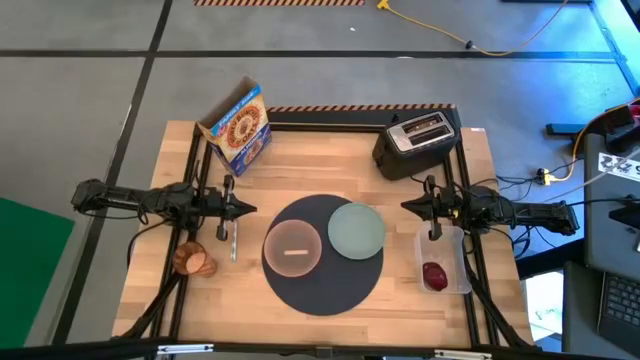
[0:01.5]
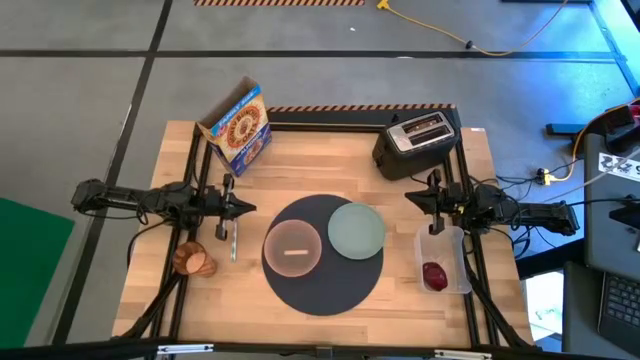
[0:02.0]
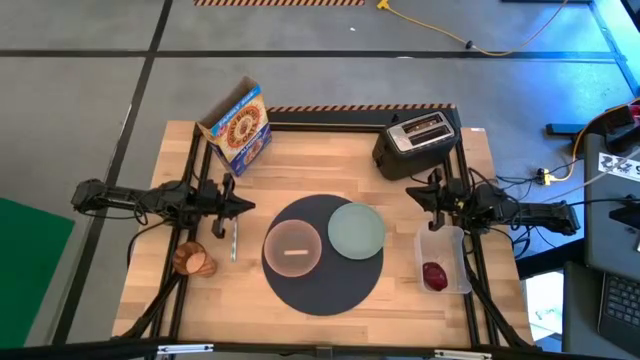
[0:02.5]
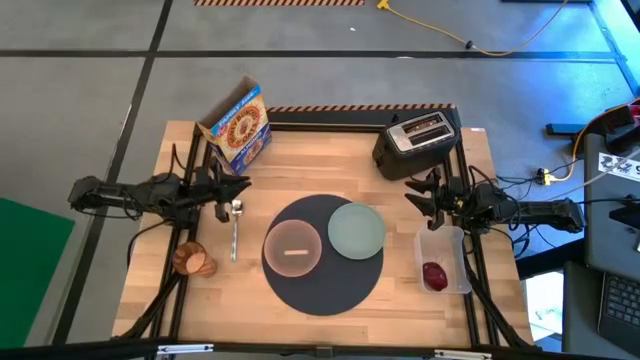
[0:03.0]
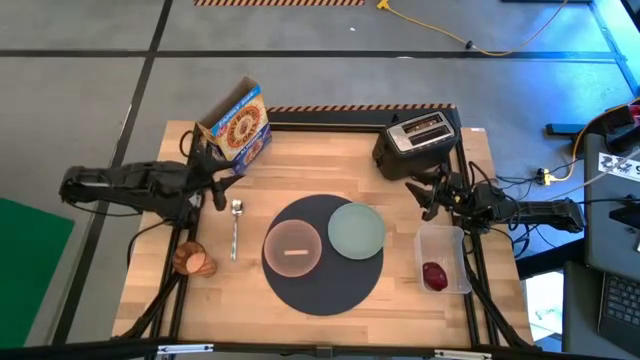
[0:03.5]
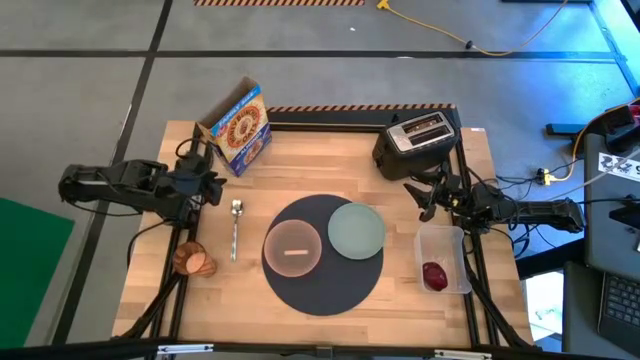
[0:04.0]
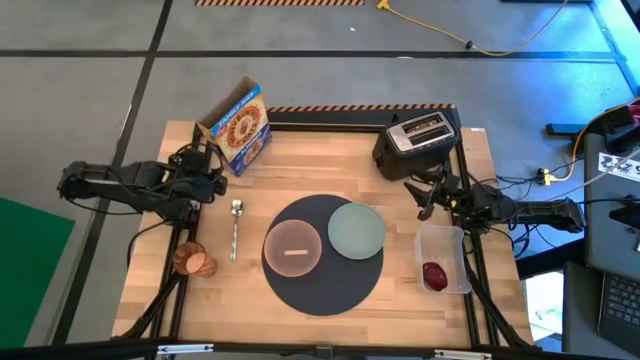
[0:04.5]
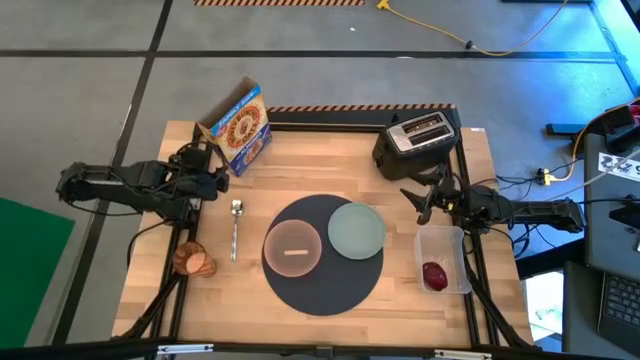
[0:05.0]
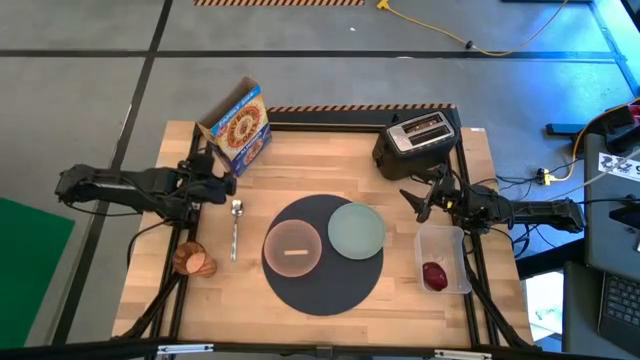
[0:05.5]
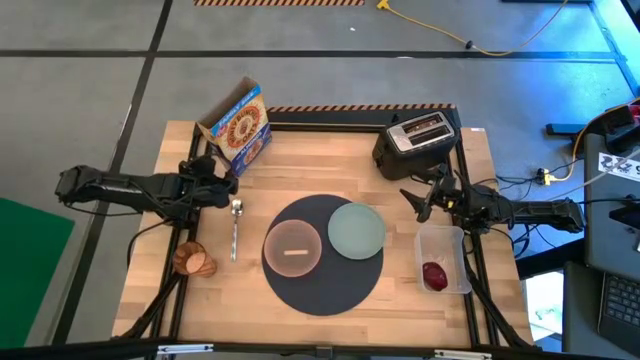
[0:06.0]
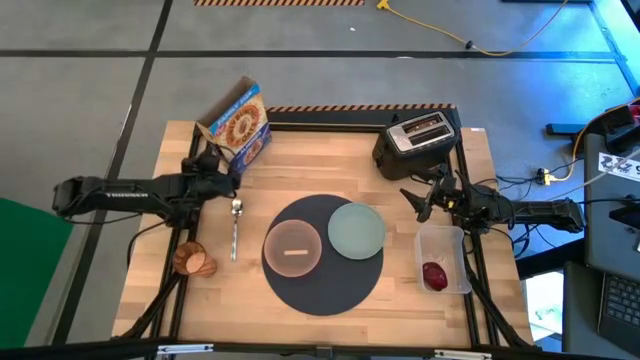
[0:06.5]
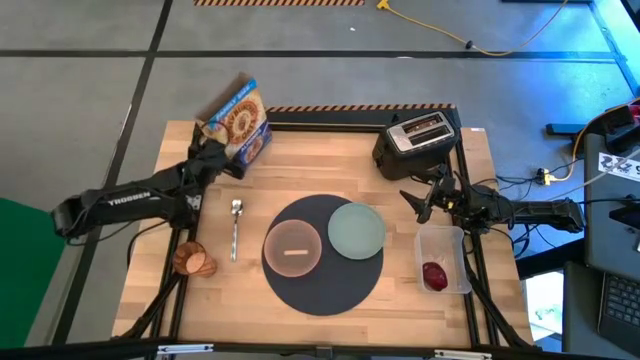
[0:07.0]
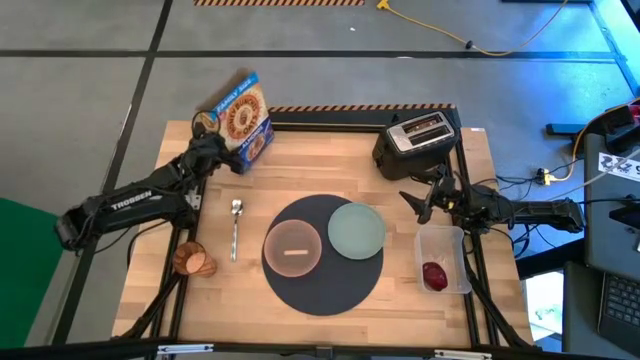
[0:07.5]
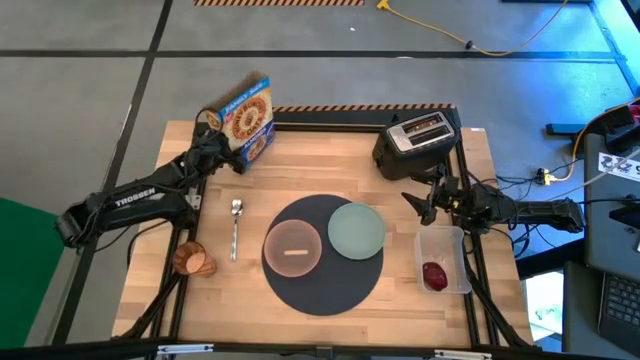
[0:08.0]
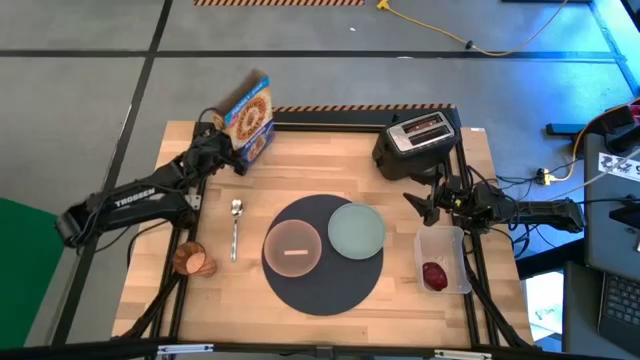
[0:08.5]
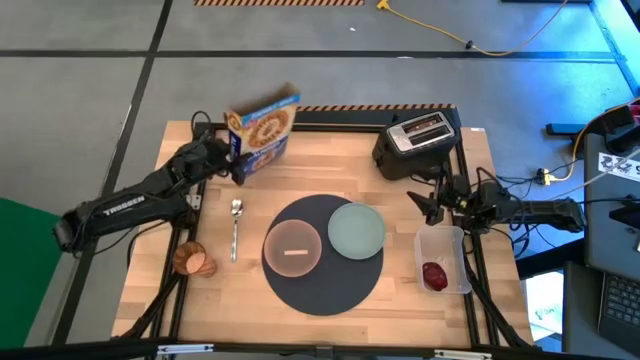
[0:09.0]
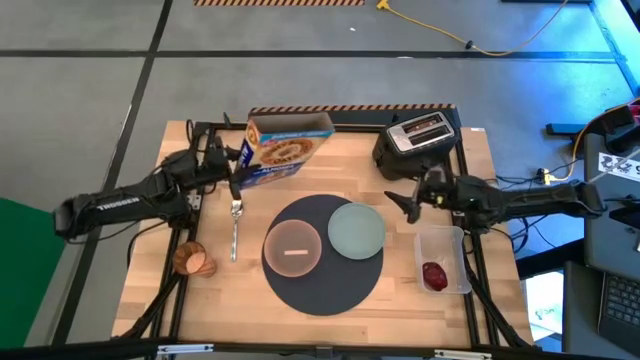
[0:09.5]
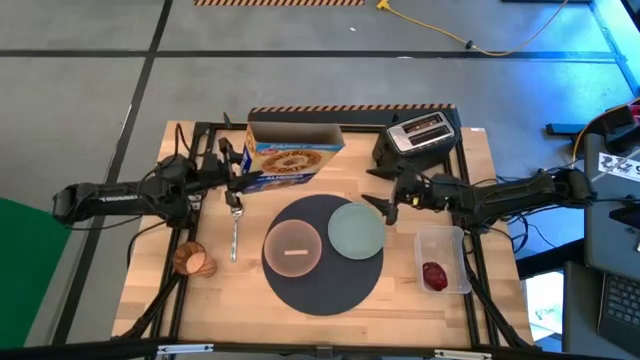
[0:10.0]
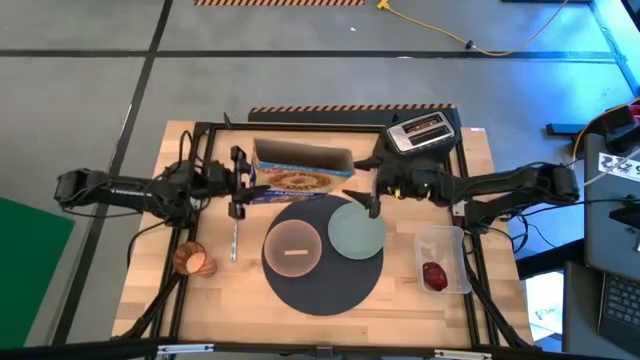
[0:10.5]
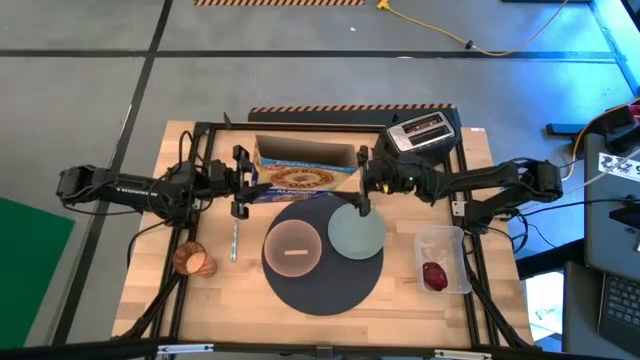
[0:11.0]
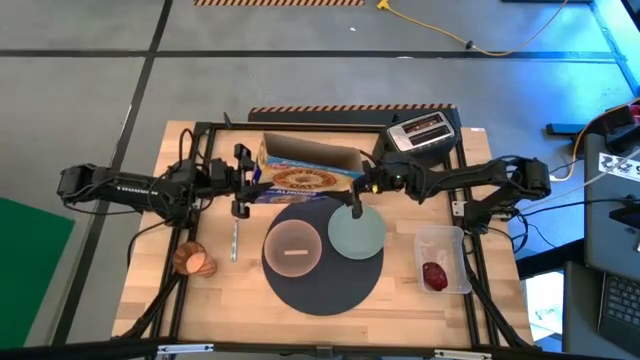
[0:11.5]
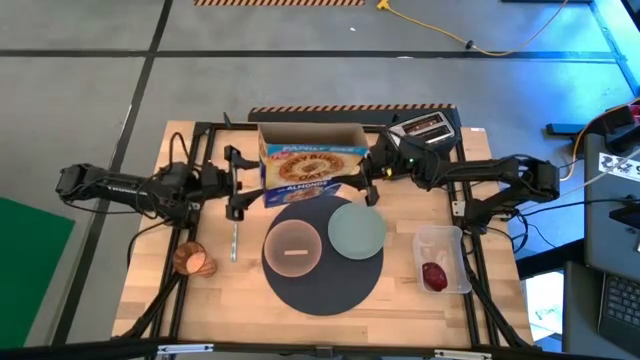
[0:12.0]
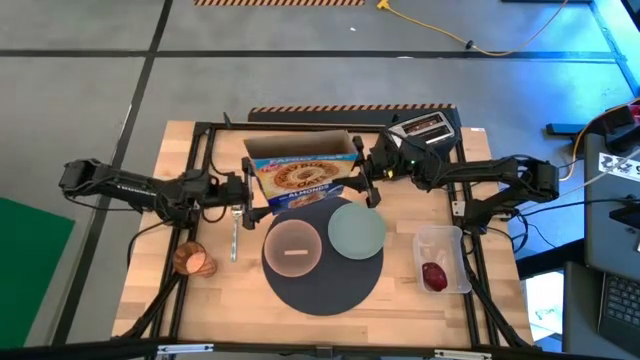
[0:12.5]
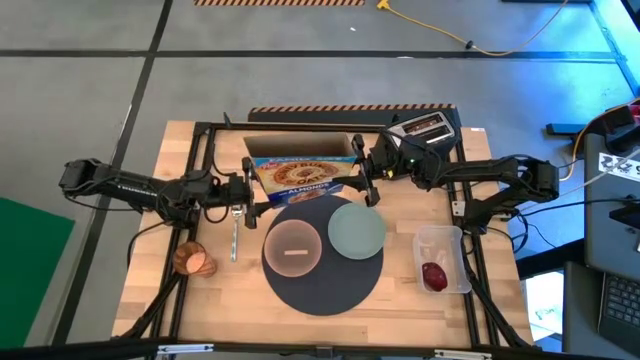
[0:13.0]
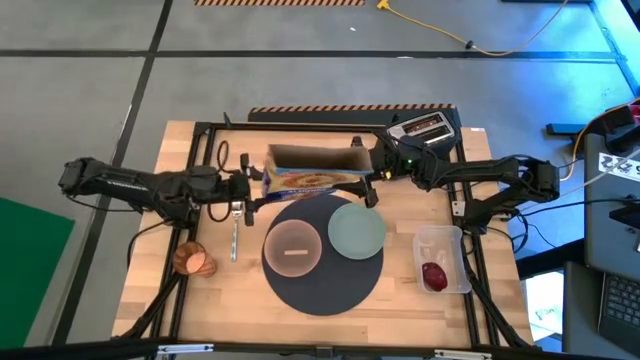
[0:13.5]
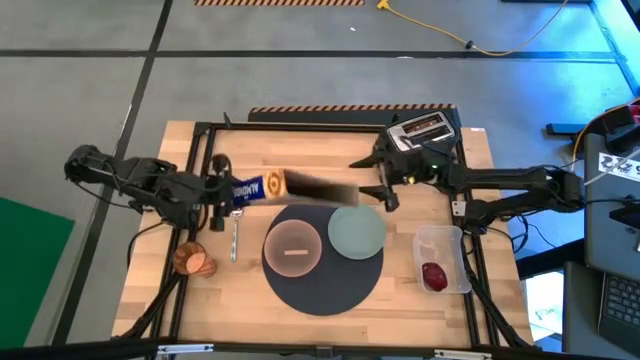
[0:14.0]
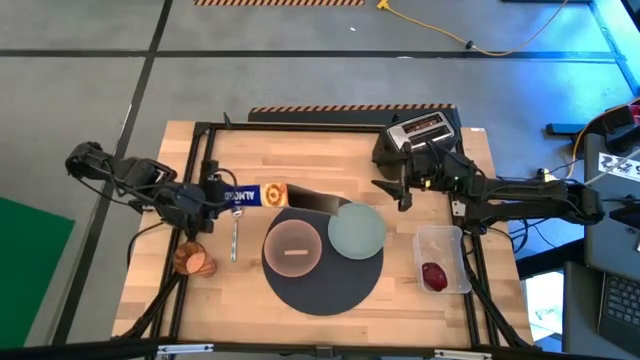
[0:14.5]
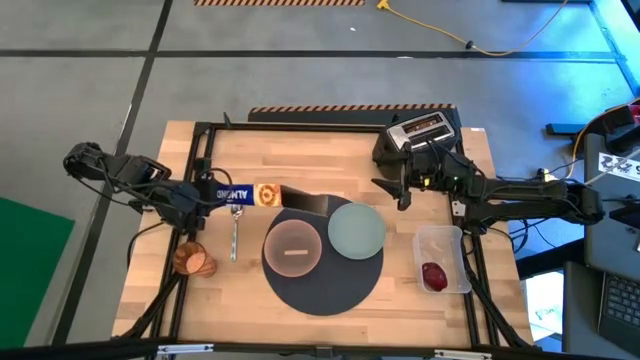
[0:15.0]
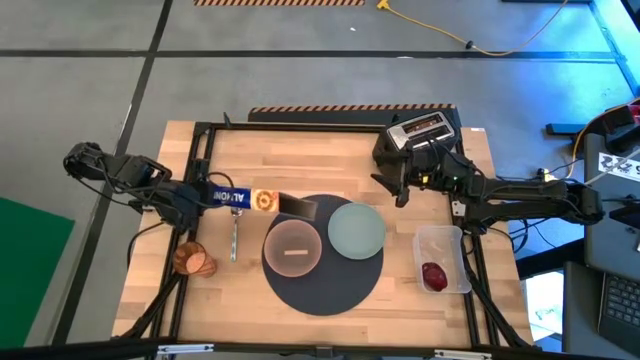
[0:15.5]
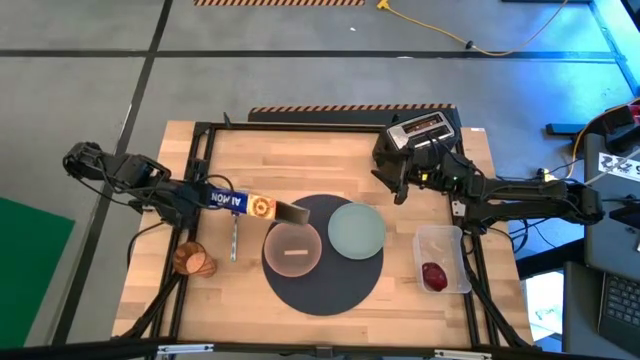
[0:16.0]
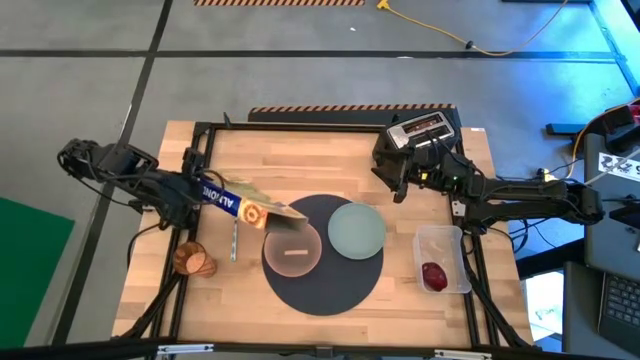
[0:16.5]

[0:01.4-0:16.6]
Task: Arrange a breakfast setting
Pour the cereal from the box into the orange bowl

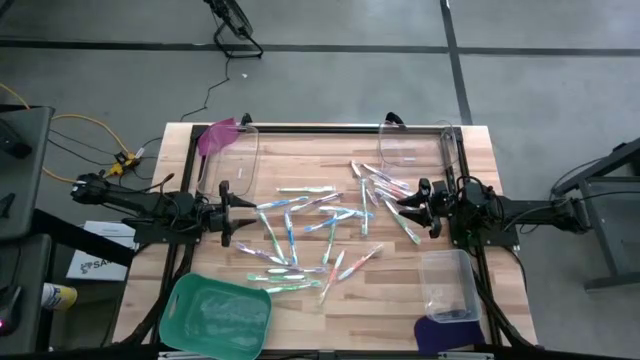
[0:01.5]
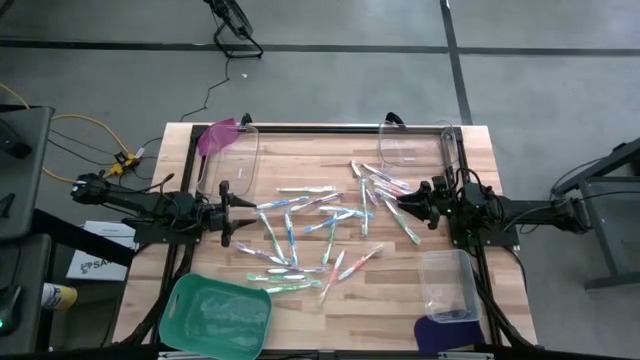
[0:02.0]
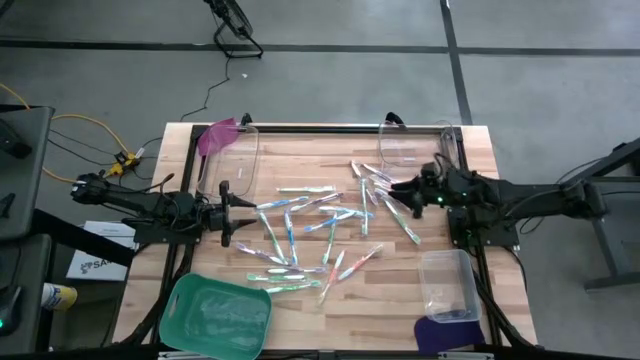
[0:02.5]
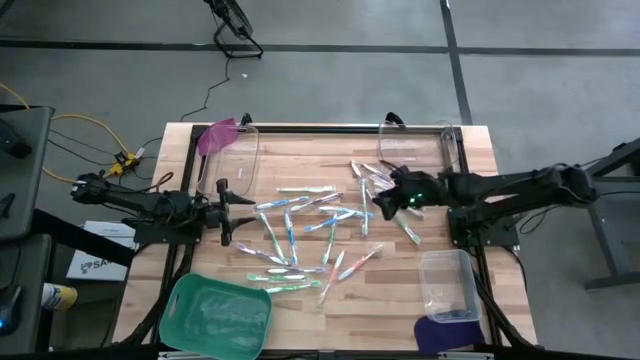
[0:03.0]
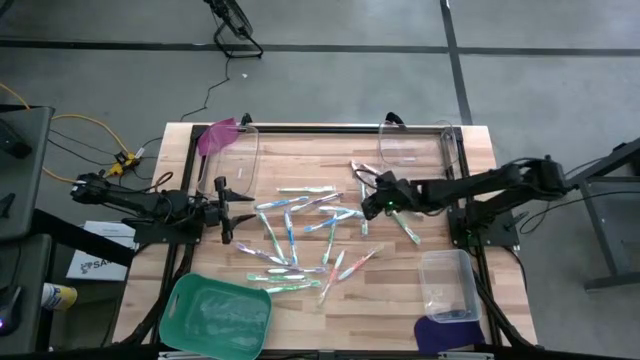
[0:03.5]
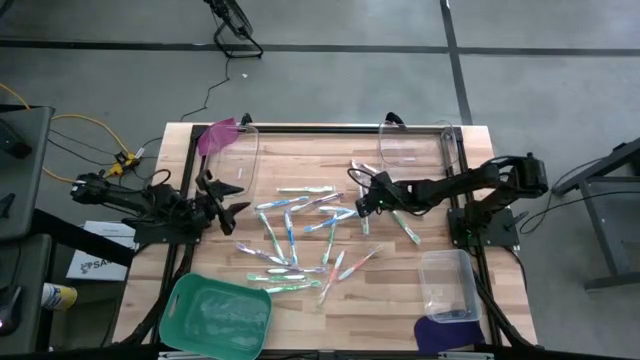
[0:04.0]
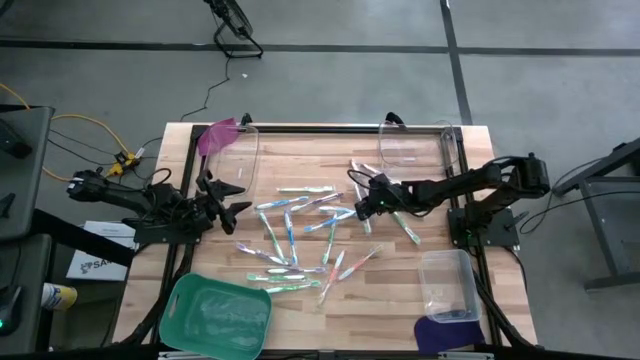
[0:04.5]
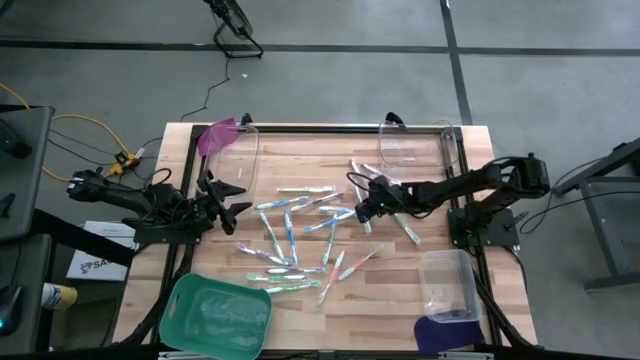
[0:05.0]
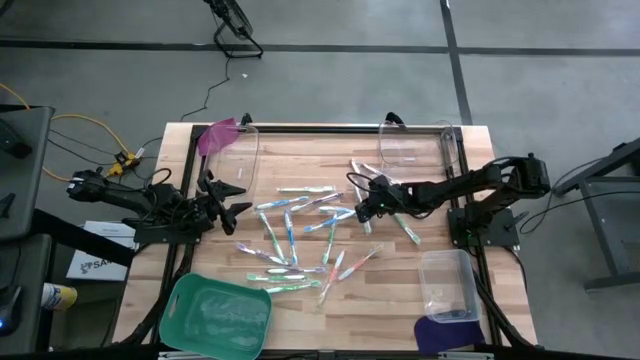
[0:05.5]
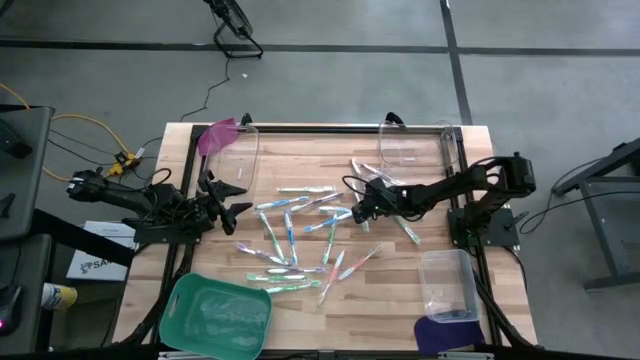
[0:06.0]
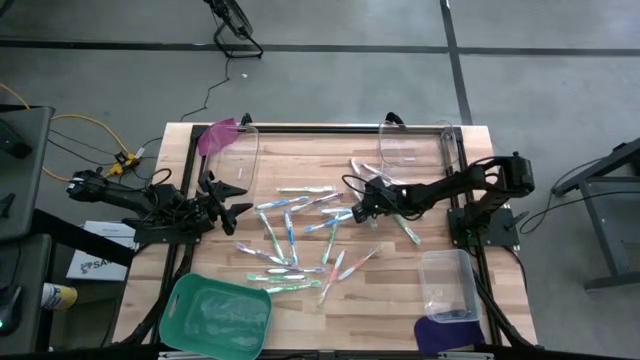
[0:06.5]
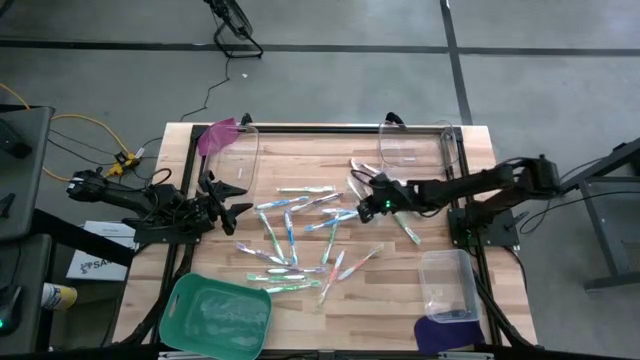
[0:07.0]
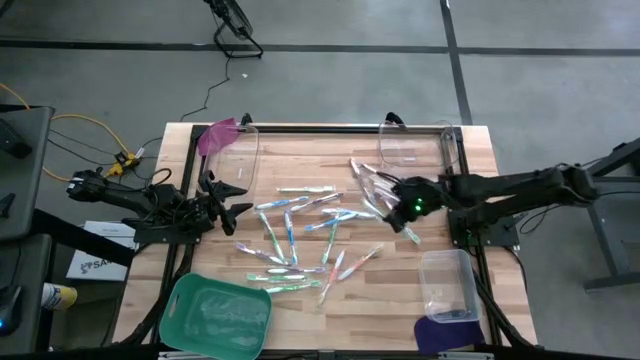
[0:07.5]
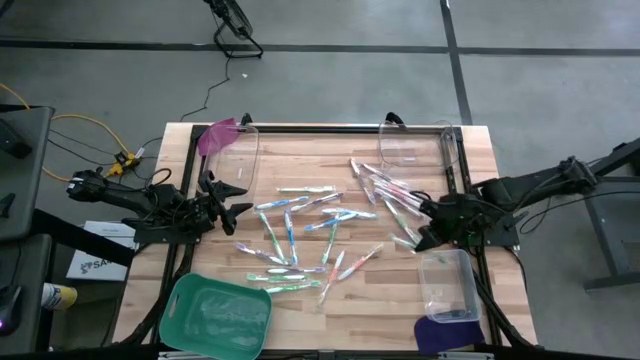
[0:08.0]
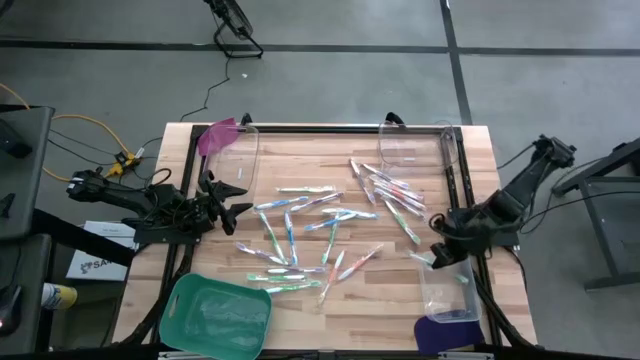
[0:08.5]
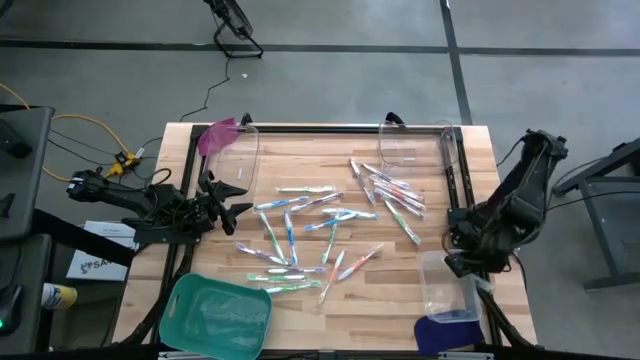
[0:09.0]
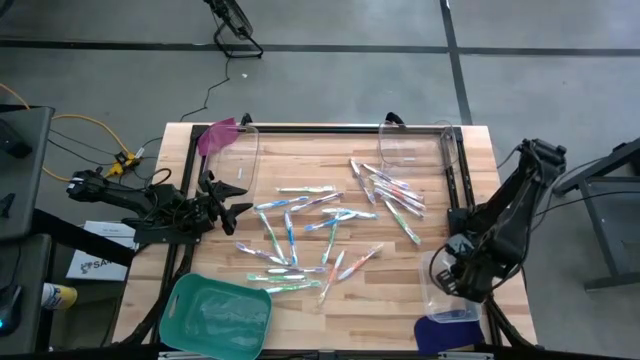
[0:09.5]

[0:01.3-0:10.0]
Task: Pick & Place Toothbrushes
Put the green toothbrush into the white bin
